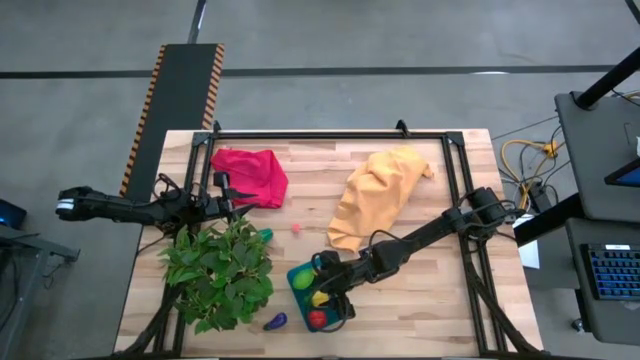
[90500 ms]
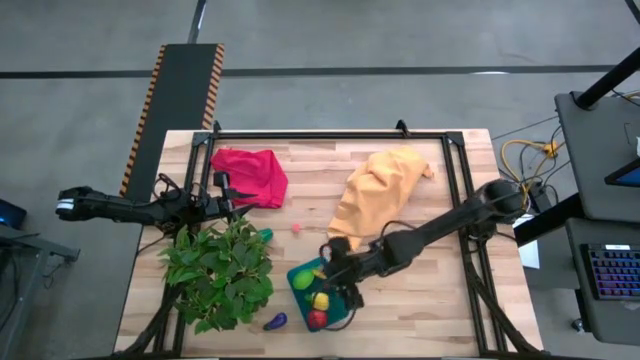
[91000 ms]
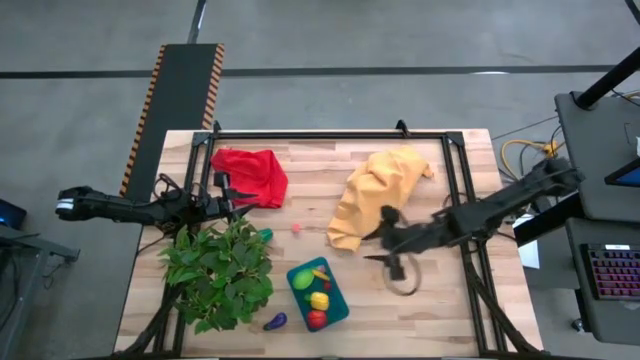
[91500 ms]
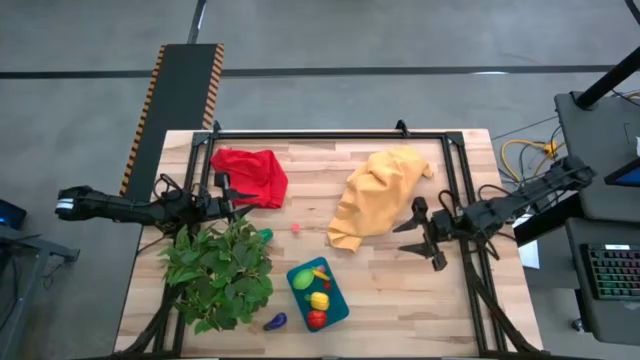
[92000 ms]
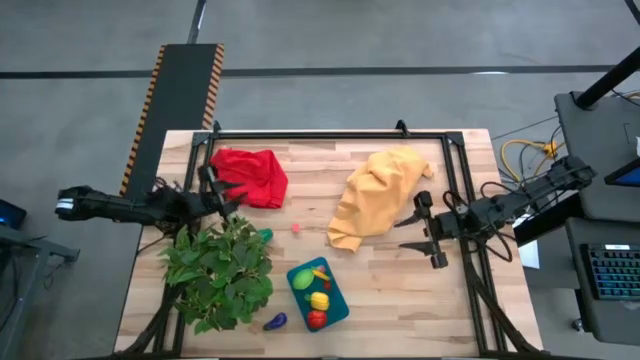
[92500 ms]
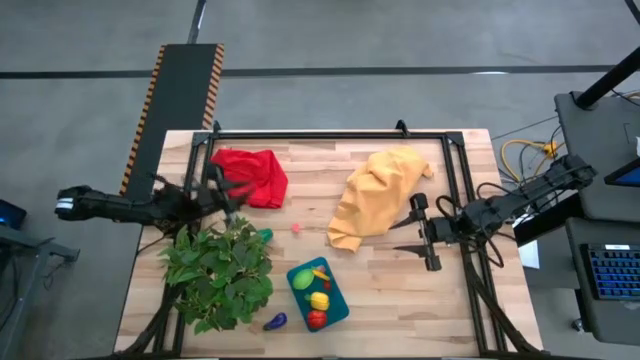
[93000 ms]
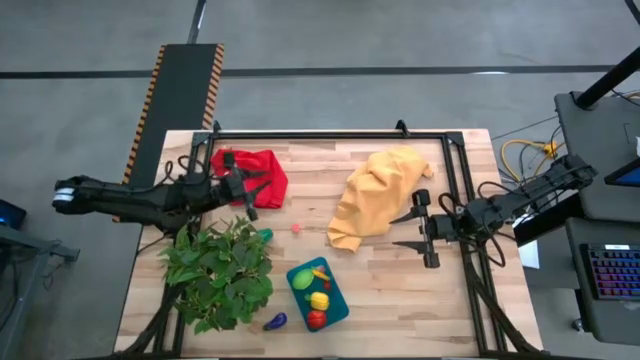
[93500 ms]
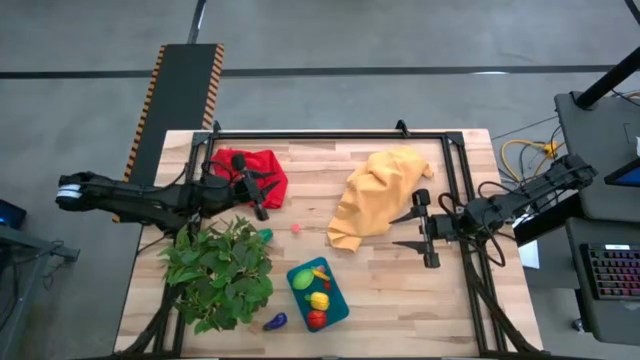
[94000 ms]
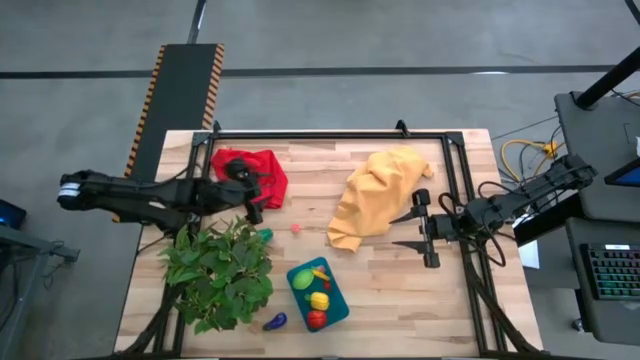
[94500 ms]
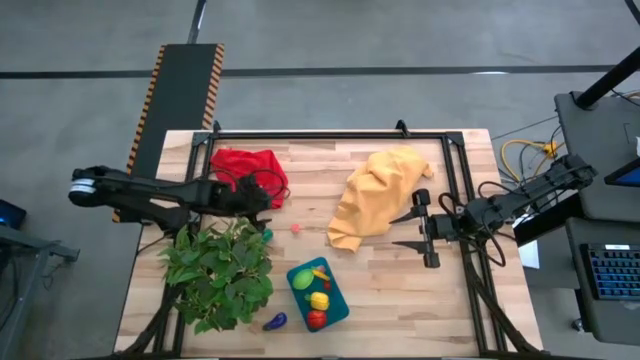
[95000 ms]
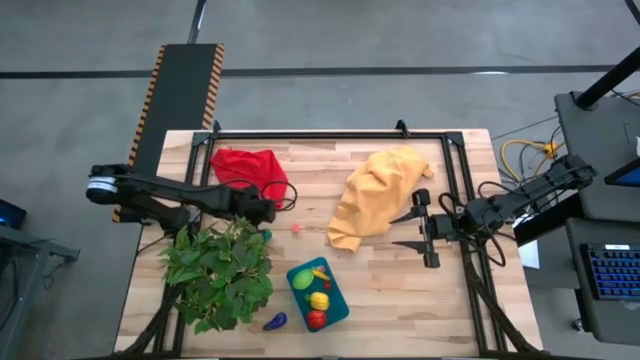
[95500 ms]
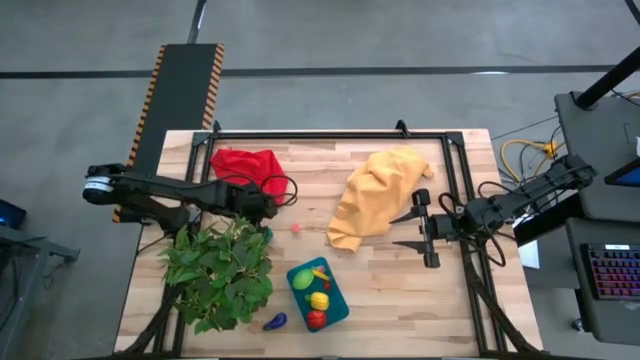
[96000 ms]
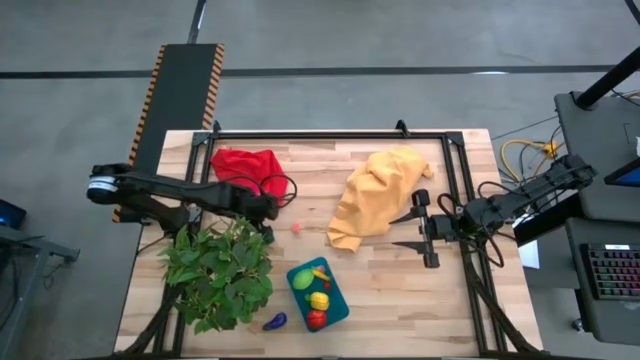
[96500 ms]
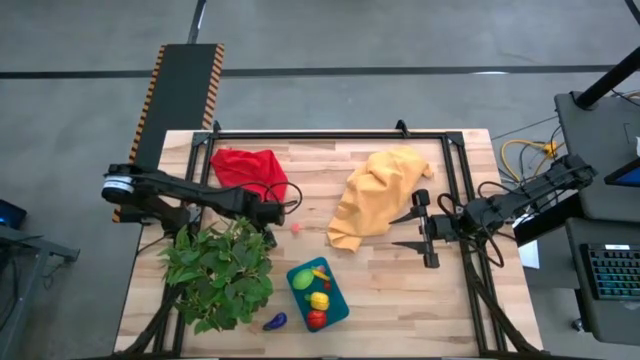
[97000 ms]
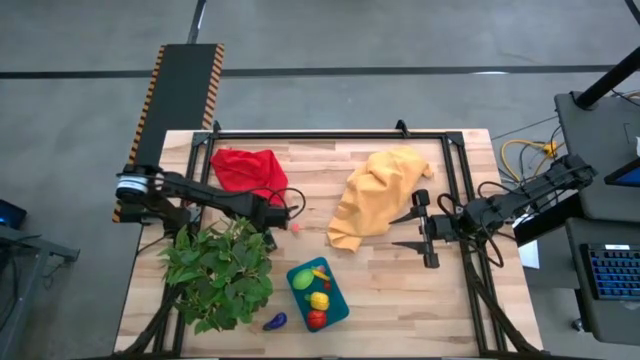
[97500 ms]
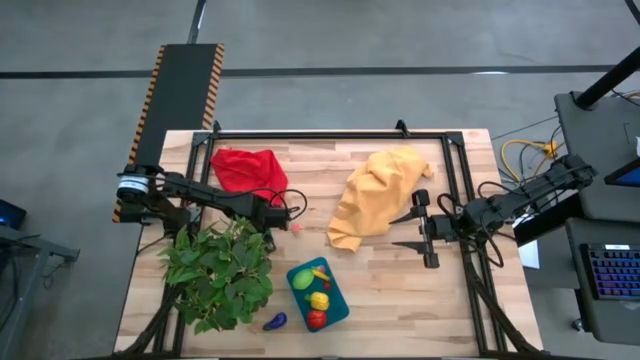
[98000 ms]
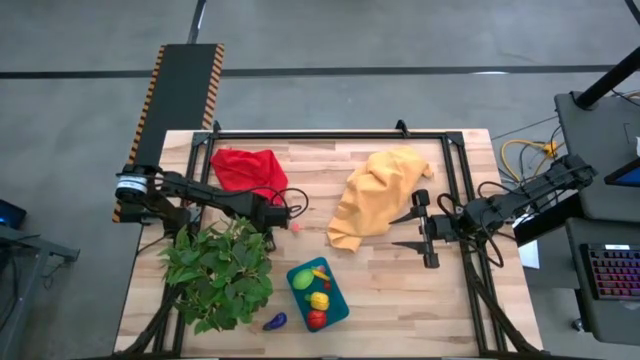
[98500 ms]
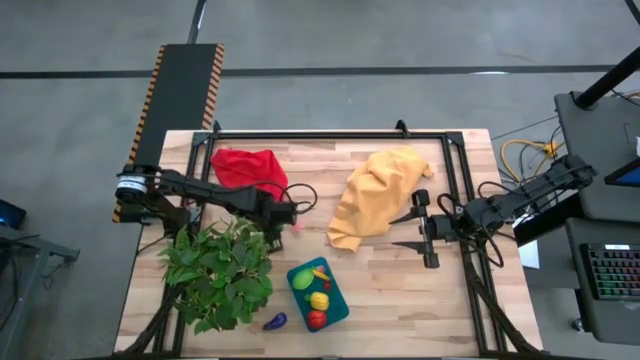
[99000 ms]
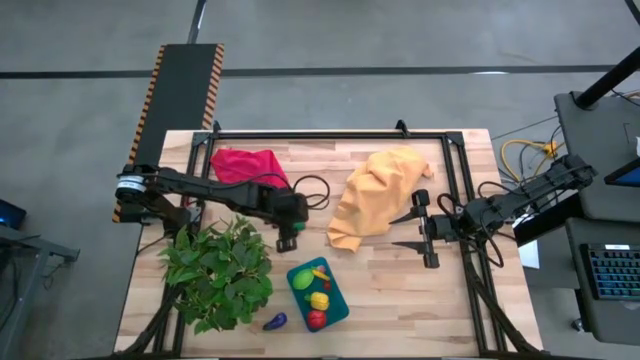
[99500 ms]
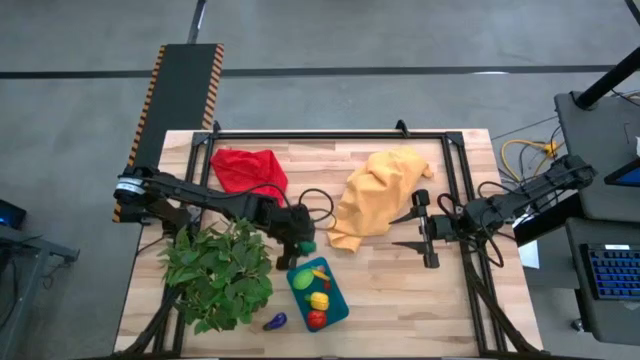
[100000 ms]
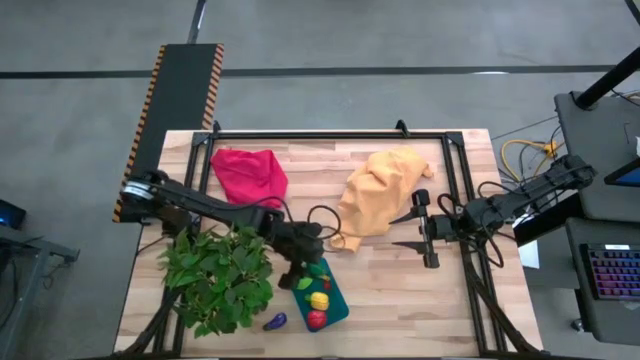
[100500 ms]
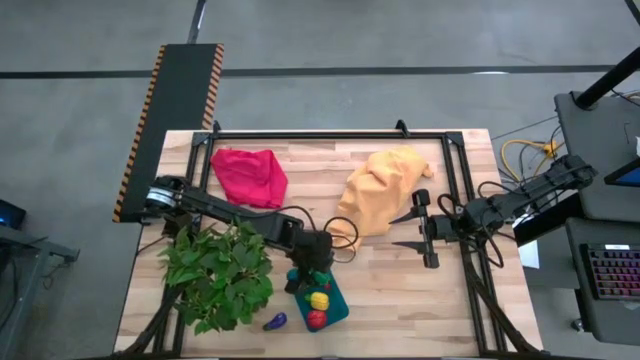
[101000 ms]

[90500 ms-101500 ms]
Task: Pick and placing Produce into tupperware
Put the bell pepper into the bin

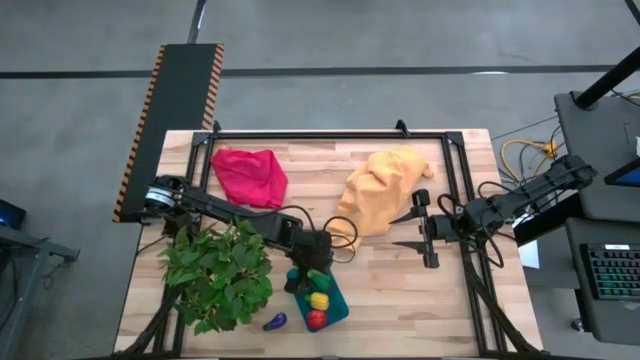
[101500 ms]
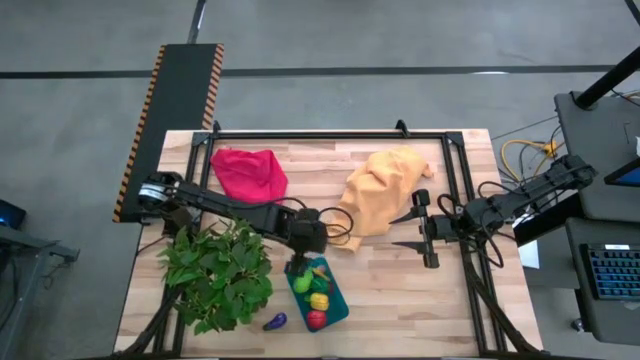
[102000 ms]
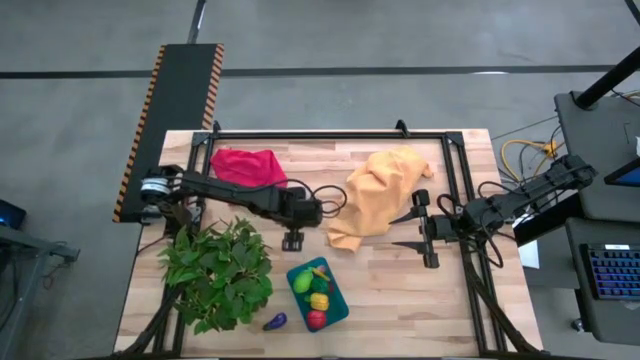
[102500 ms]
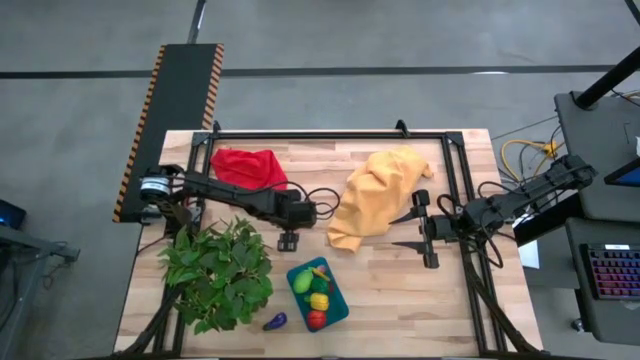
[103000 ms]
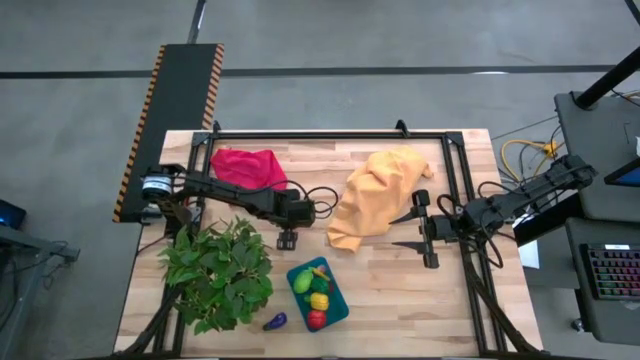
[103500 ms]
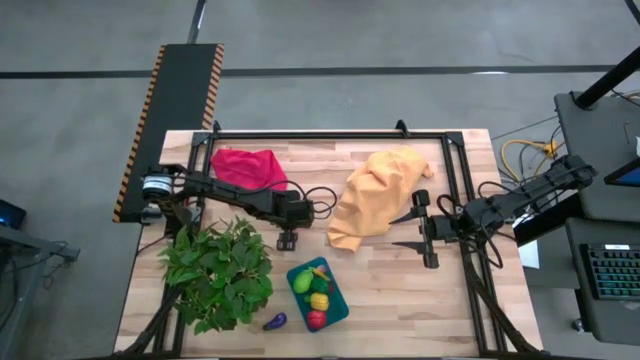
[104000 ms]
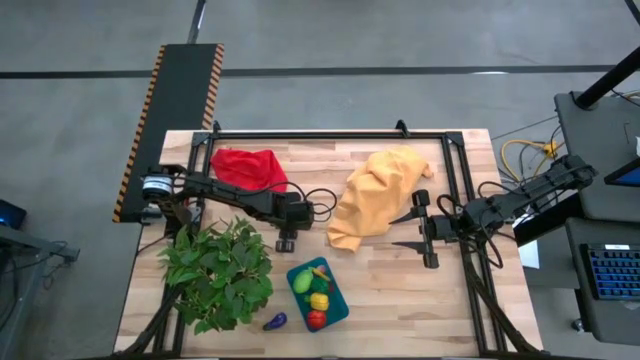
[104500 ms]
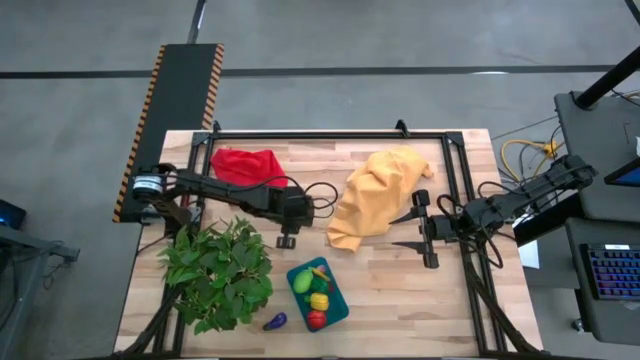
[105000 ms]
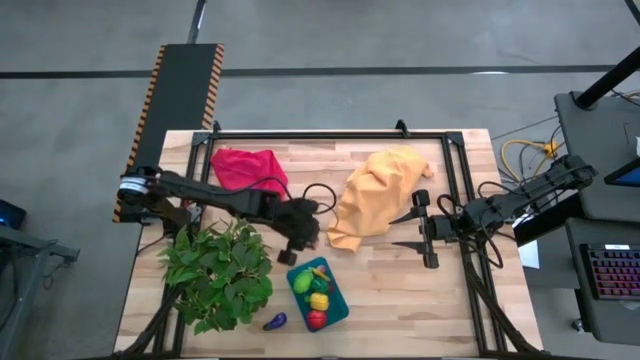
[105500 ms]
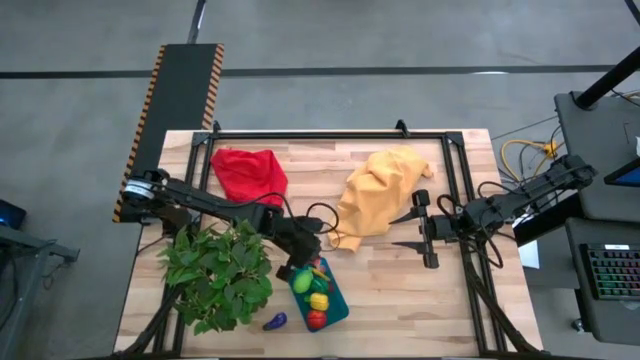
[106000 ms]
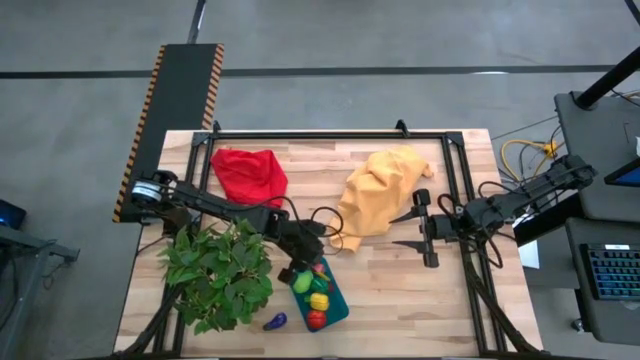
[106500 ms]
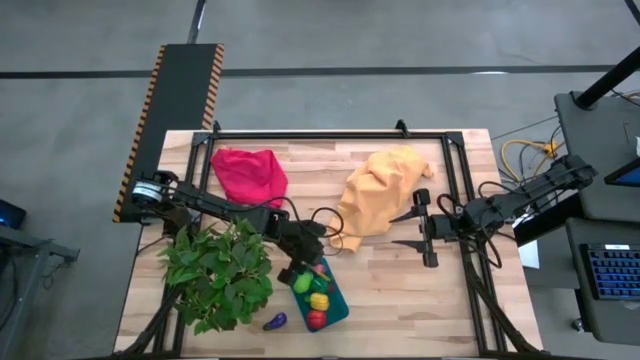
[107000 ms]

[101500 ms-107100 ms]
Put the peach into the bin

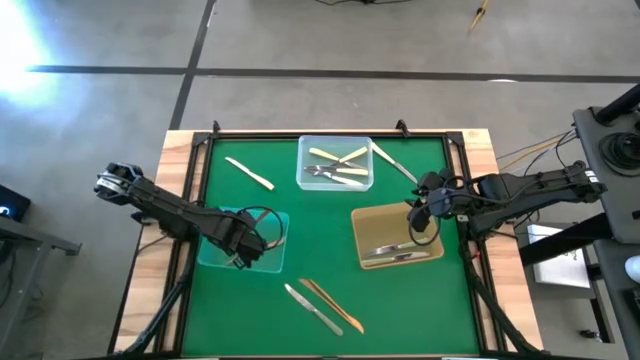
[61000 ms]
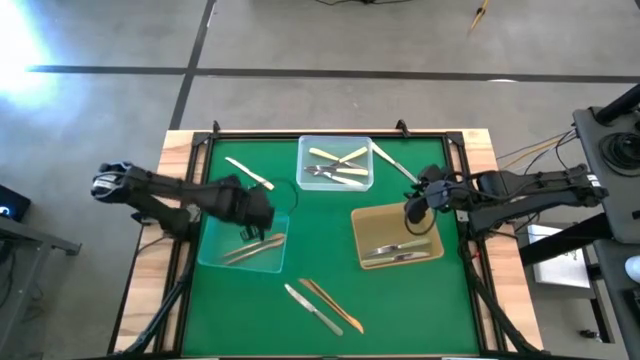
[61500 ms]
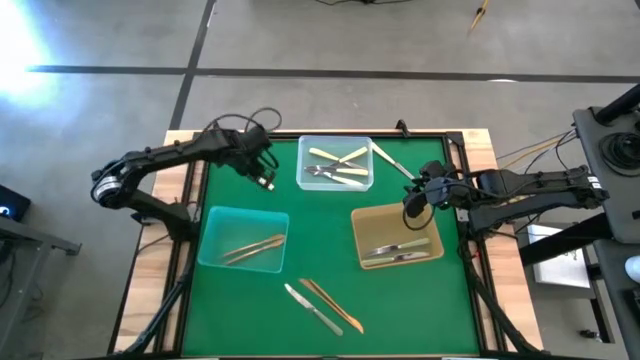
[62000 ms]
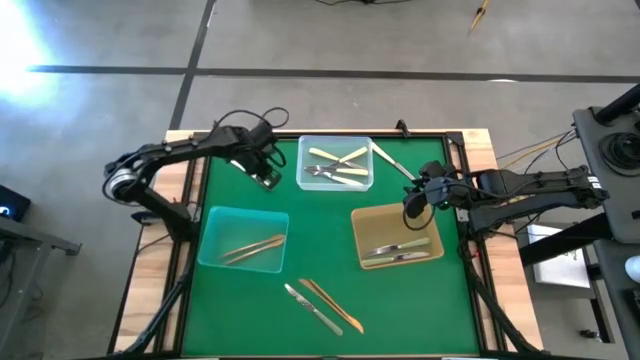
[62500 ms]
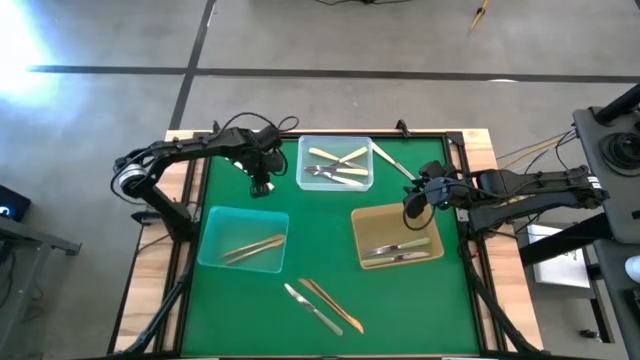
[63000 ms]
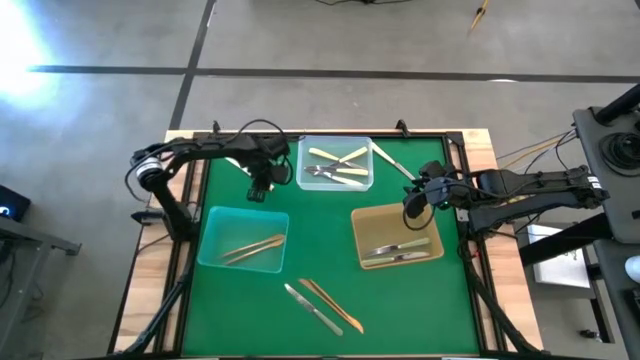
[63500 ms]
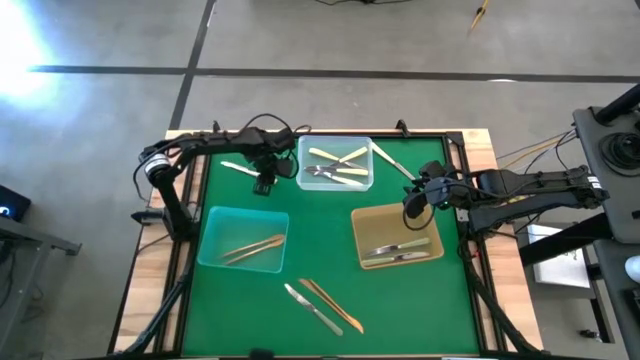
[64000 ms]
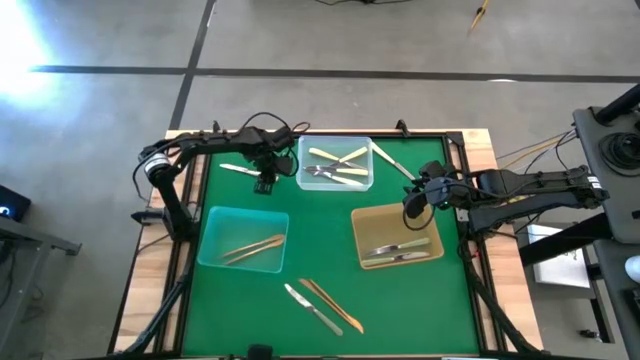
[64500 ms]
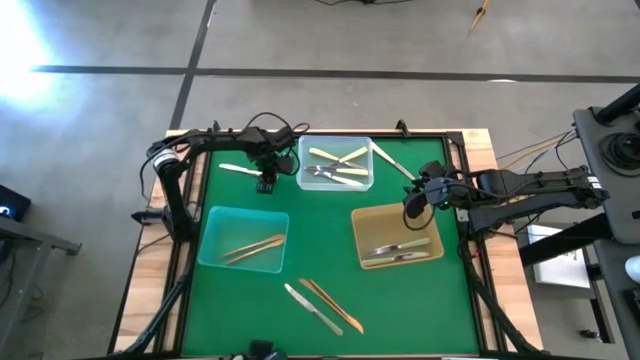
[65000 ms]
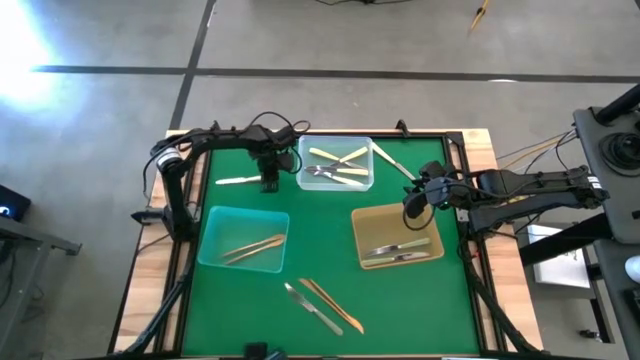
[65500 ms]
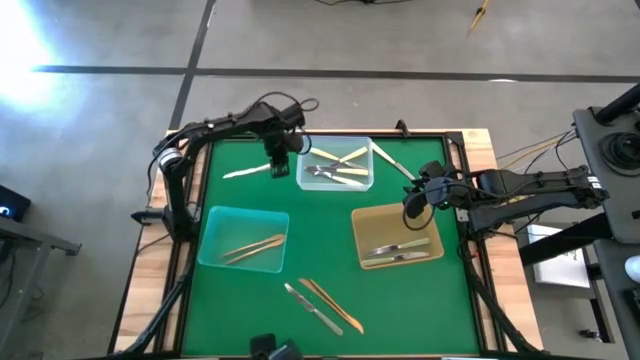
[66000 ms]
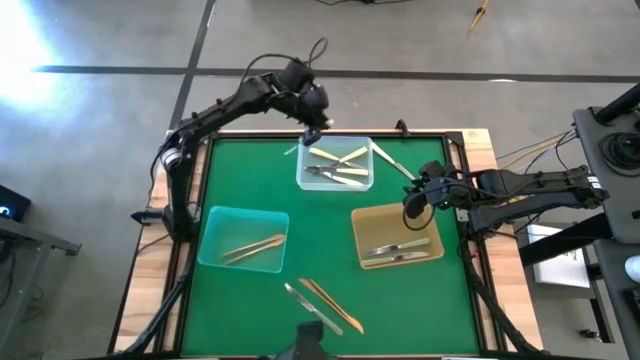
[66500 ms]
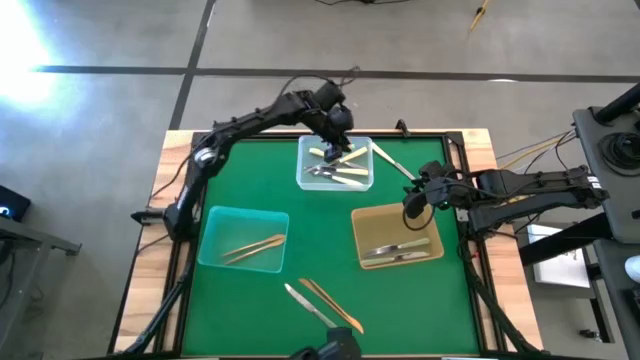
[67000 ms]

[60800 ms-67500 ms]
Task: Sort silverware by color (type)
Put the yellow knife into the transparent bin
